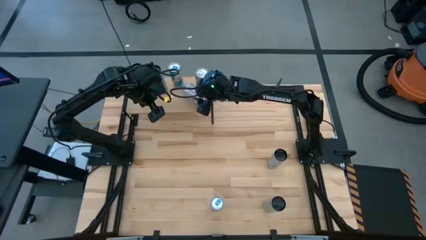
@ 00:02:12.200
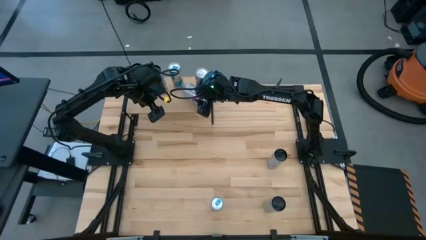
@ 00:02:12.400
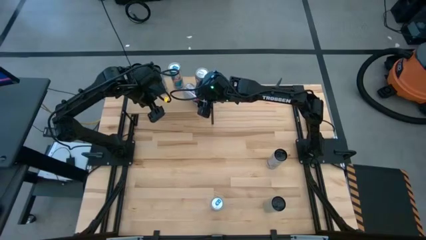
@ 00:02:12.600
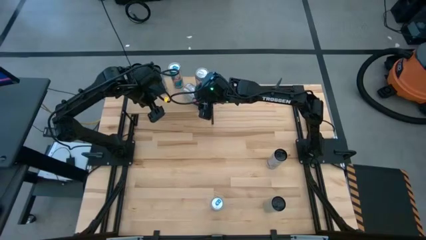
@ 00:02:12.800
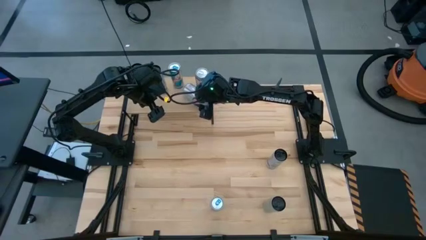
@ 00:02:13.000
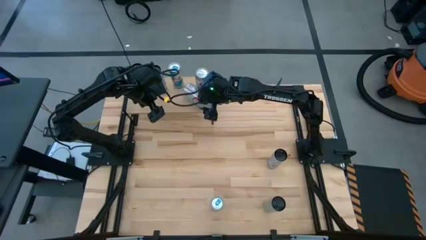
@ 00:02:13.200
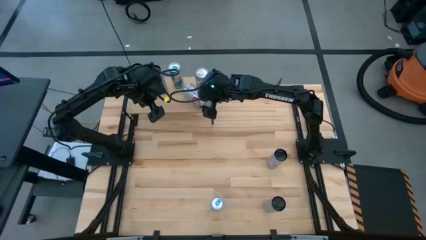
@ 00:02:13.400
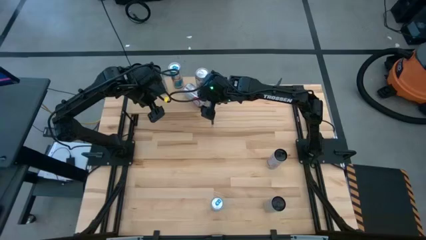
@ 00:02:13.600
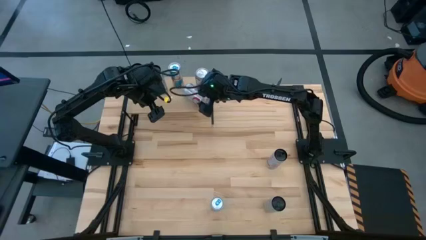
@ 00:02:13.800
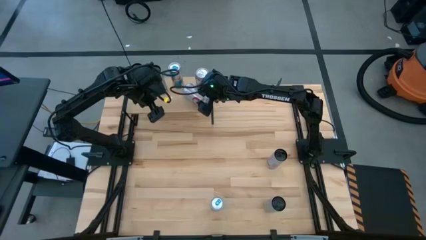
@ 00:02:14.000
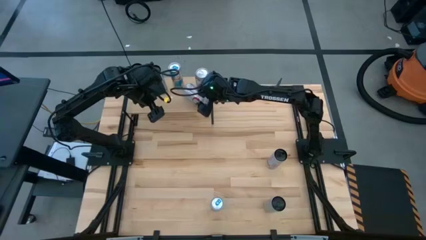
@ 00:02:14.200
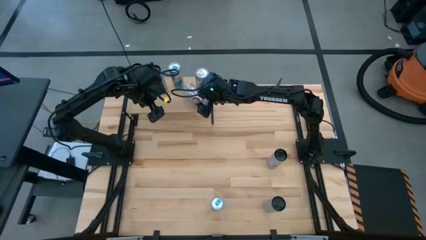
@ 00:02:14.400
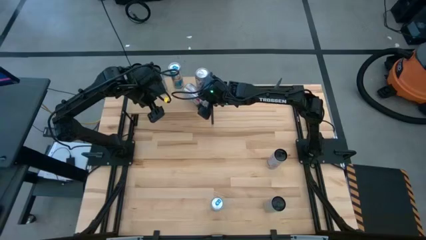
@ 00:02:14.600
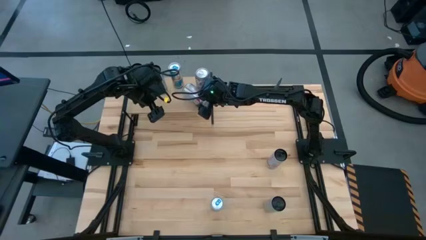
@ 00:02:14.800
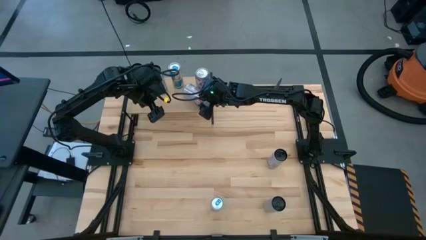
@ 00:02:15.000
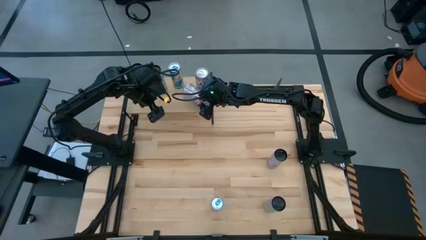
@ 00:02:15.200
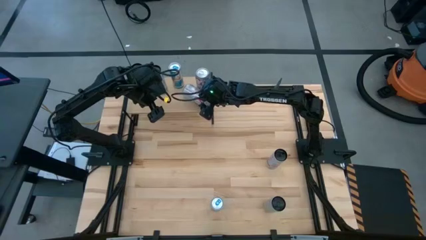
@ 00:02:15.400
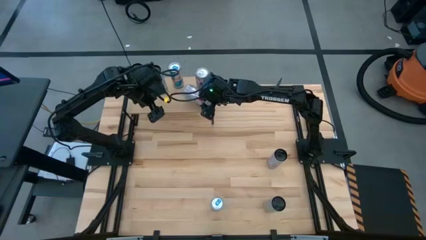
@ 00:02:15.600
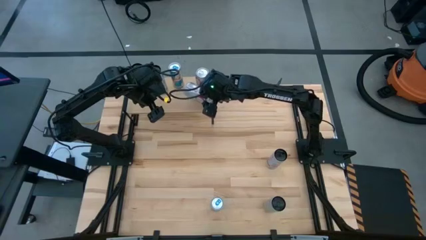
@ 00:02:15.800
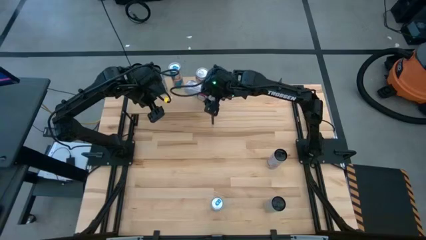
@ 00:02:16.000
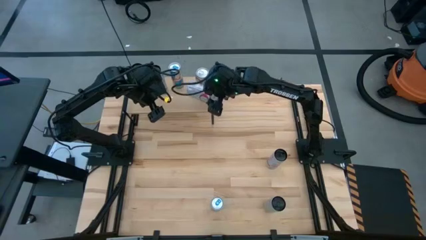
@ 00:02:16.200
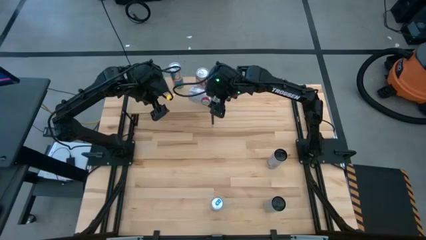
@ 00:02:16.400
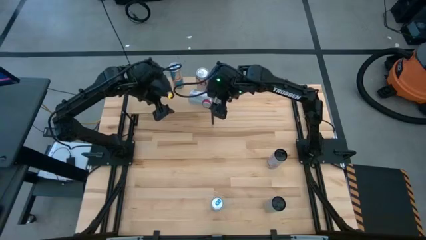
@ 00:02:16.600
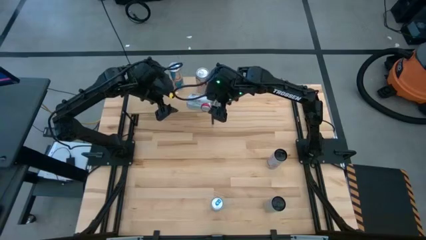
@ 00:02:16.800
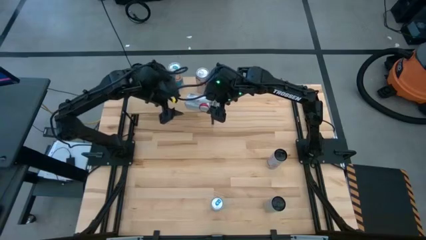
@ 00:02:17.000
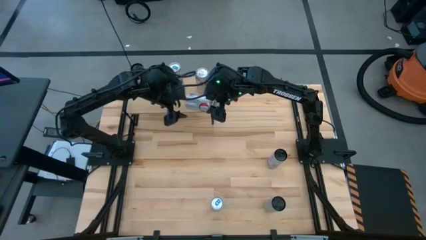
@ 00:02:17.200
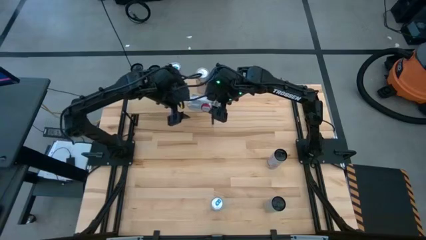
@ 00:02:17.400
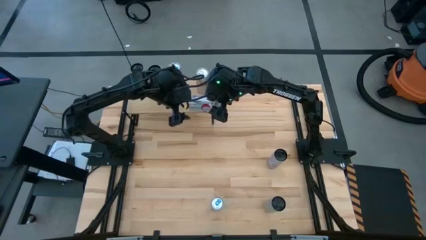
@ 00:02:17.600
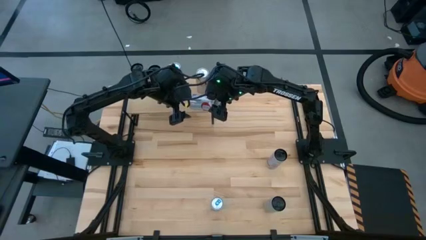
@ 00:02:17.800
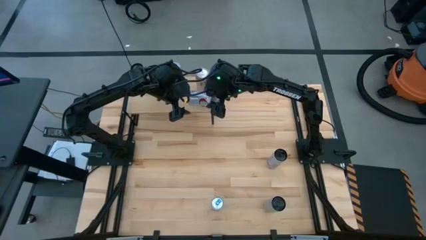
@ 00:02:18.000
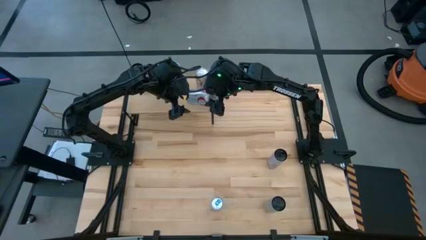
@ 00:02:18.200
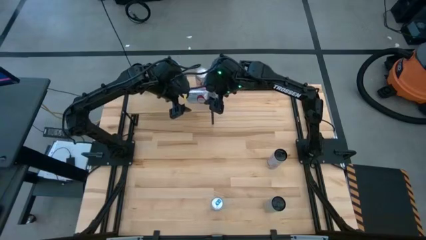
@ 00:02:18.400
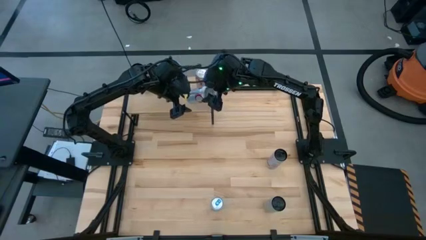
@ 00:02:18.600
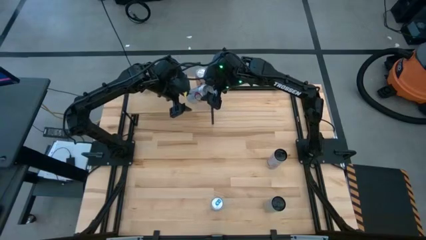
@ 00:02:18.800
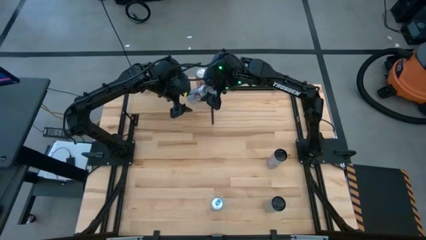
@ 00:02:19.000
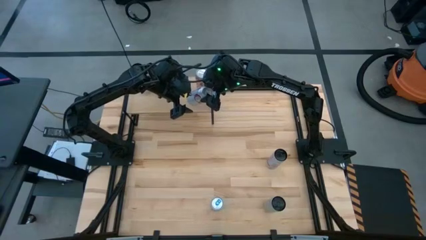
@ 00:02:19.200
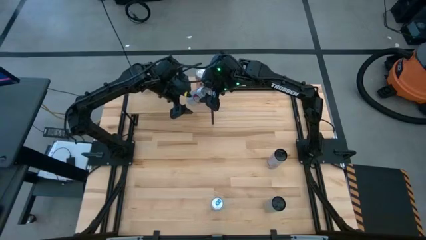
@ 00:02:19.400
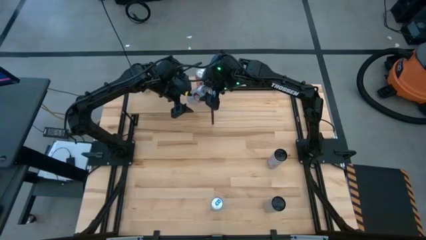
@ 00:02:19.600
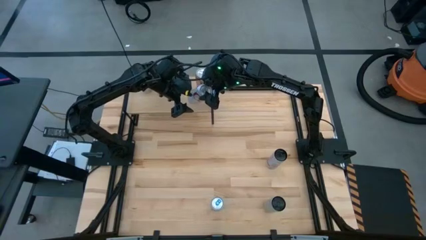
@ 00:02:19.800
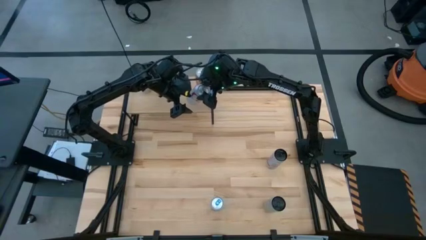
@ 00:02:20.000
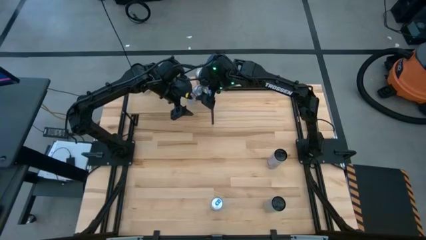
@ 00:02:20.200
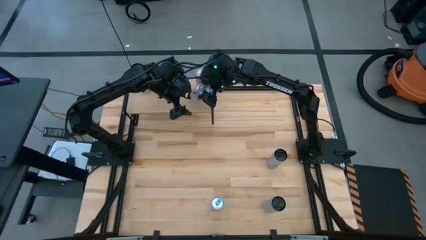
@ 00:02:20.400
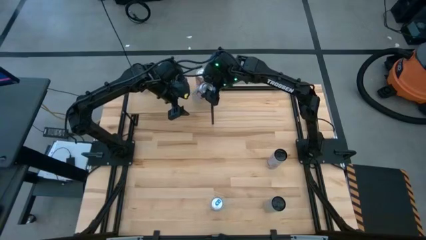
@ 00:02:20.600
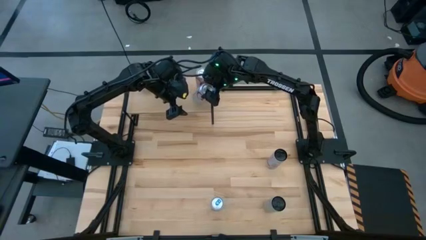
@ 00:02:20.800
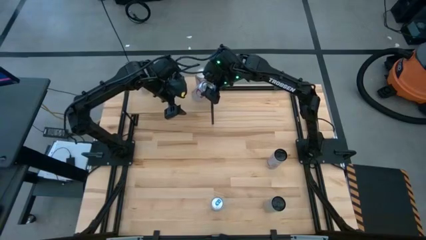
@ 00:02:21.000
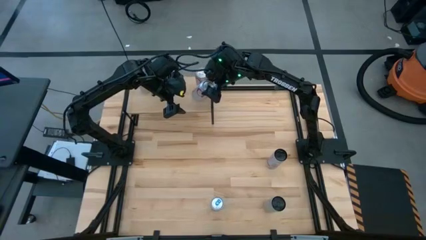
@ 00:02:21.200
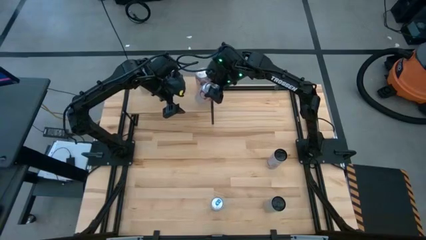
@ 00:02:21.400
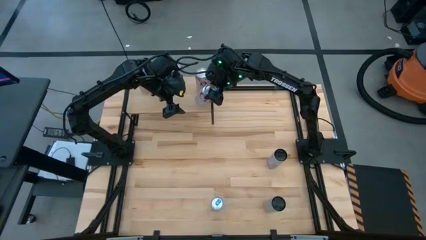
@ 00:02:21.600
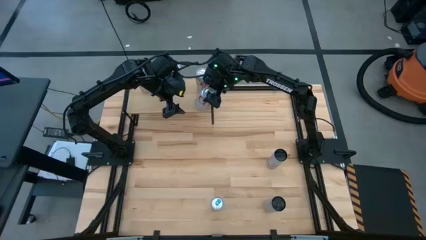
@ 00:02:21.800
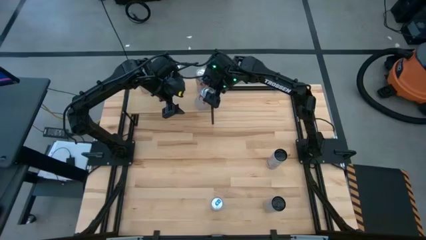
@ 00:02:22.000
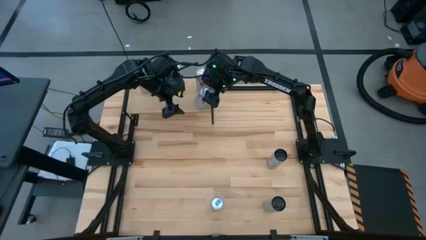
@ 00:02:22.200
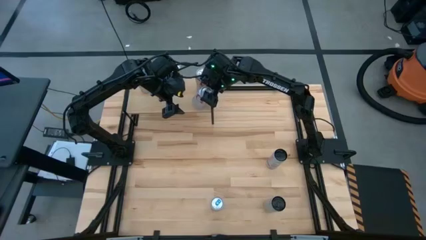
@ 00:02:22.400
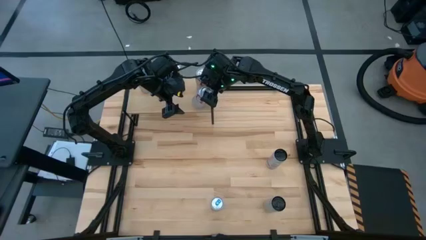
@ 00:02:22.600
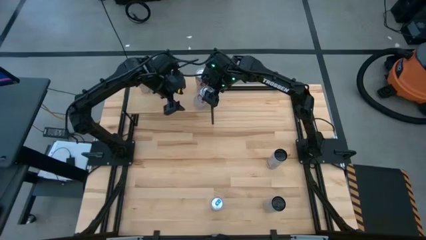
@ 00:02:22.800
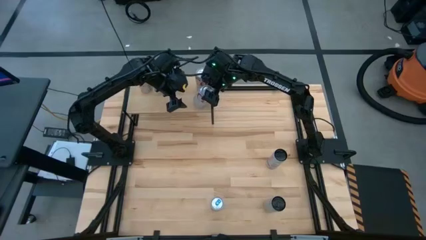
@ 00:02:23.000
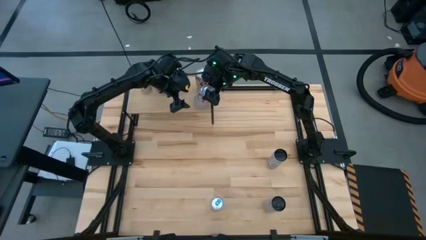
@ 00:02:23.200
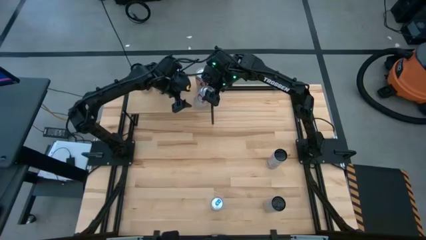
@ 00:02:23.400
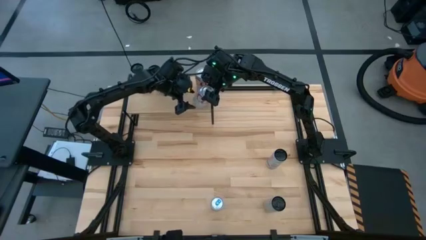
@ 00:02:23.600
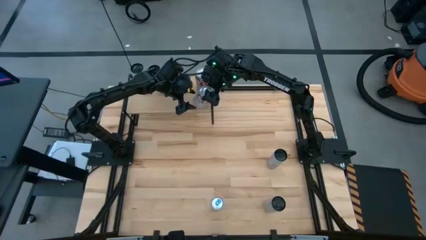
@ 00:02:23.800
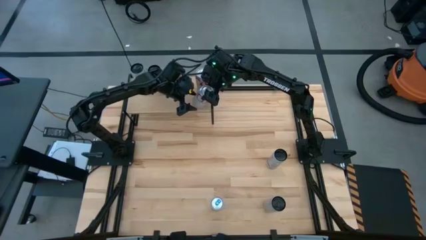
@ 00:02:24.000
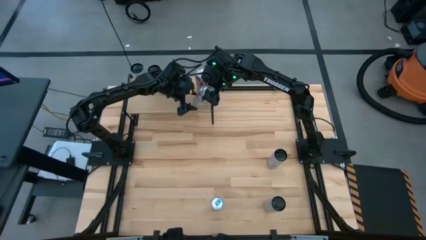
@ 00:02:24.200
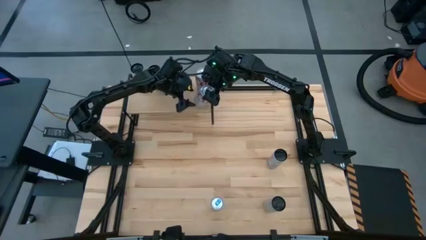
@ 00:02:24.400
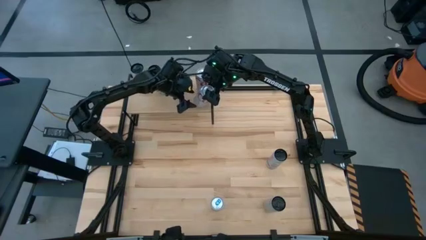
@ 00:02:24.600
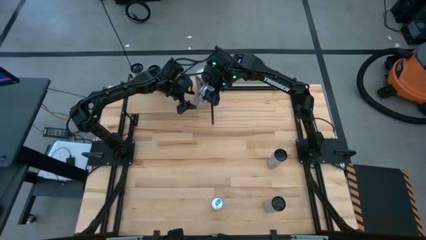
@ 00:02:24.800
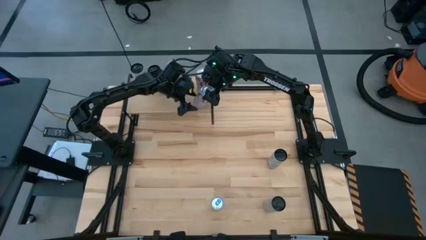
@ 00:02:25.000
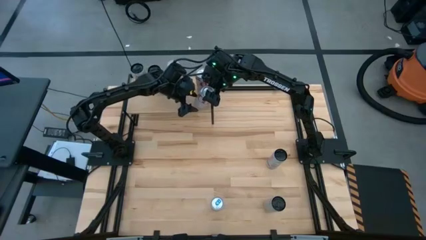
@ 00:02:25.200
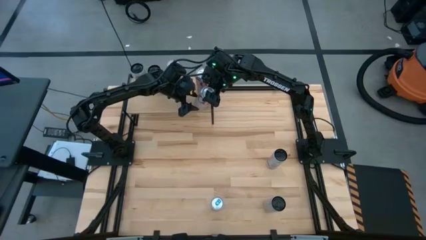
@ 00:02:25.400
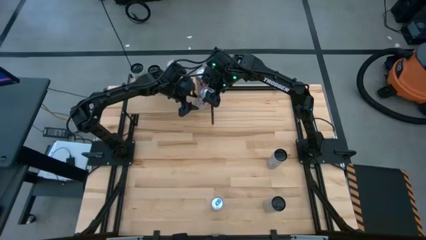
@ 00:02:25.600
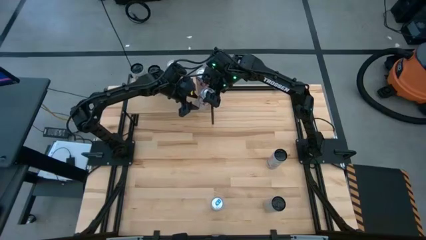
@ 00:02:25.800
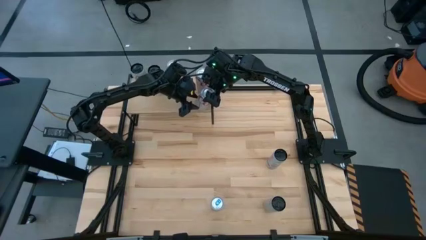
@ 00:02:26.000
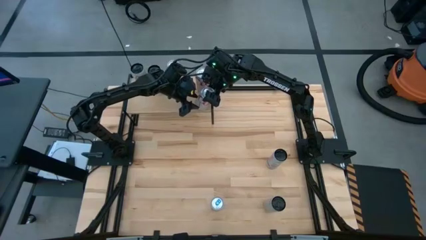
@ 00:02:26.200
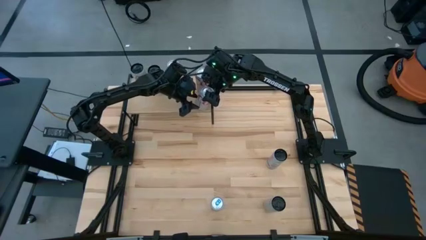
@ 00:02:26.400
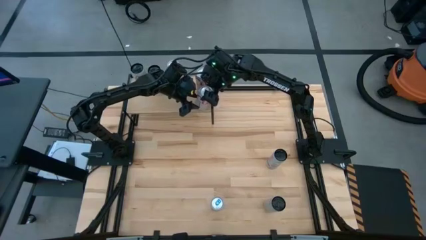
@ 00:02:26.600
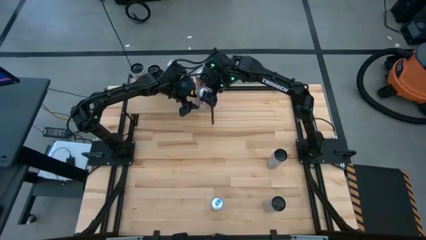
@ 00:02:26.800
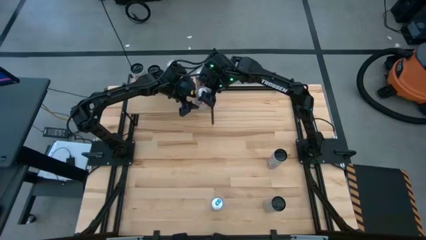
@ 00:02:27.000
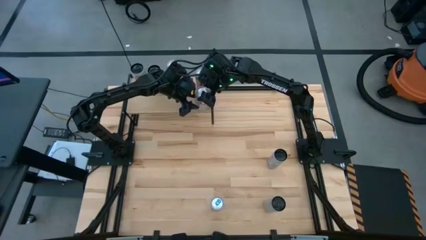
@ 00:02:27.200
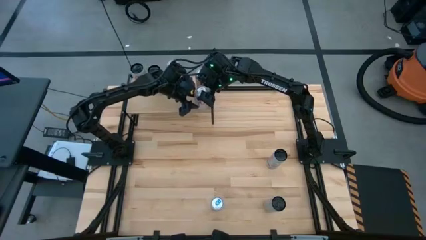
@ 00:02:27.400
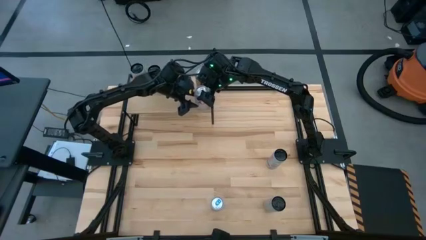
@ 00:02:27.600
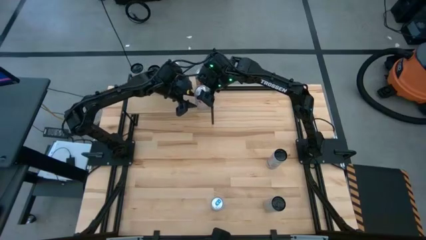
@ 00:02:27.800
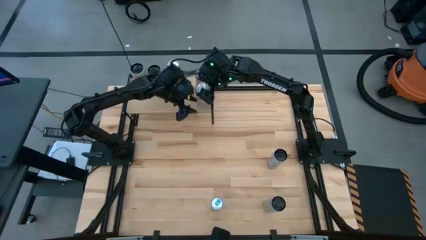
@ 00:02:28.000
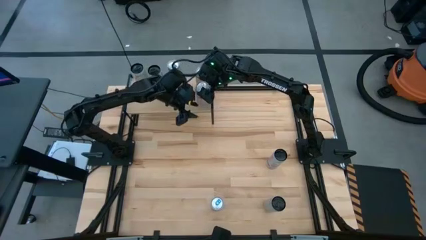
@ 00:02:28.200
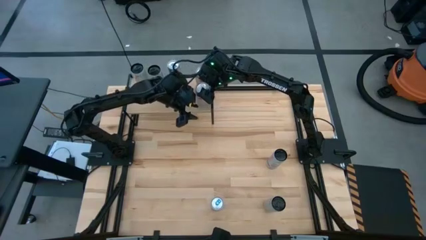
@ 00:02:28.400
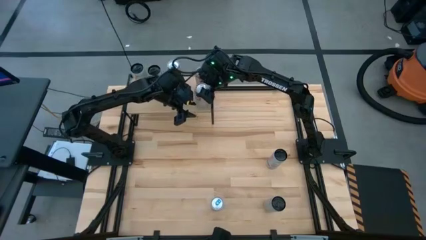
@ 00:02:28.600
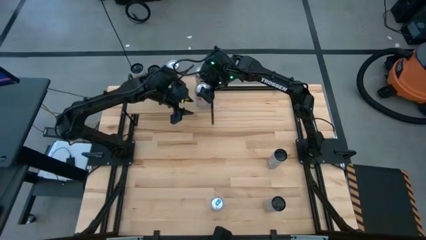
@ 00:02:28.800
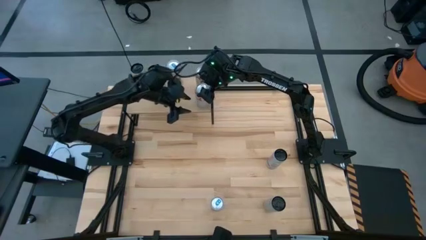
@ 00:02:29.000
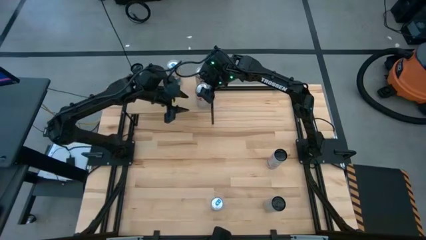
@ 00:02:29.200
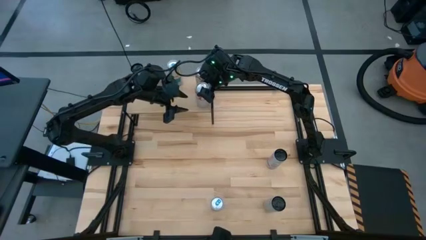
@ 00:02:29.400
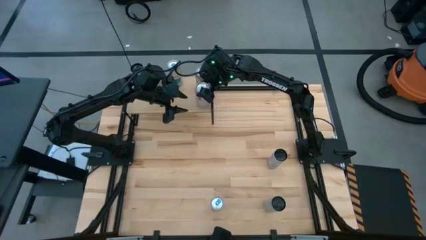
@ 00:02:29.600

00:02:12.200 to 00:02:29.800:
Task: Place canned beverage on shelf
Put the red-silver soda can on the shelf aligned with the other red-silver soda can
